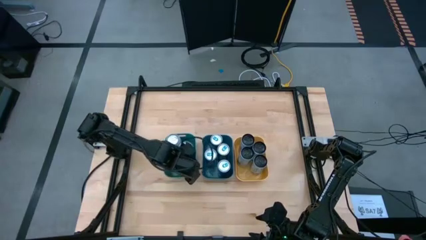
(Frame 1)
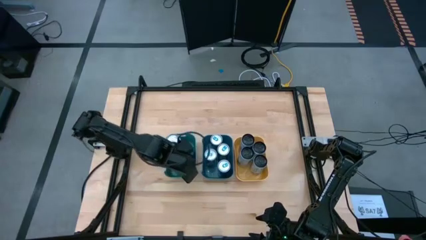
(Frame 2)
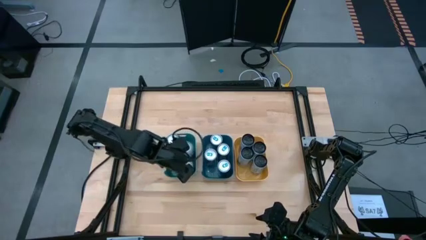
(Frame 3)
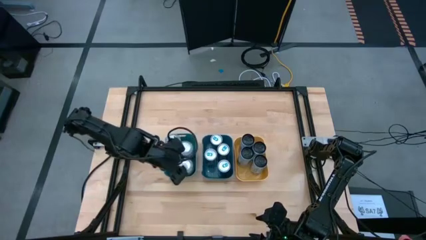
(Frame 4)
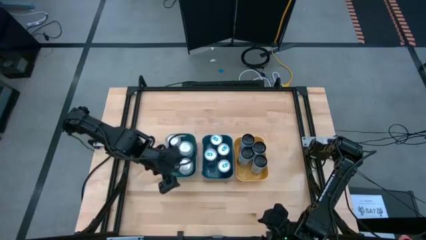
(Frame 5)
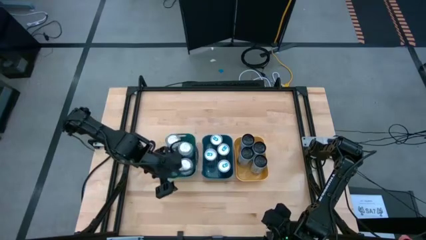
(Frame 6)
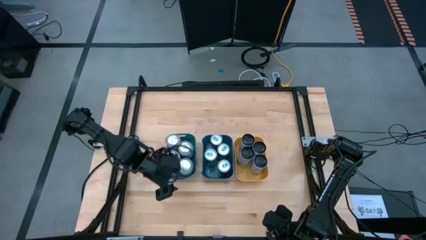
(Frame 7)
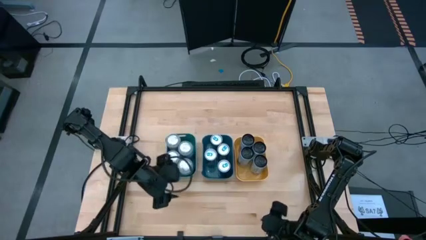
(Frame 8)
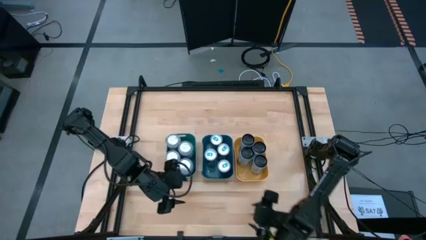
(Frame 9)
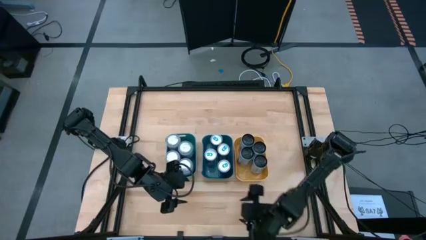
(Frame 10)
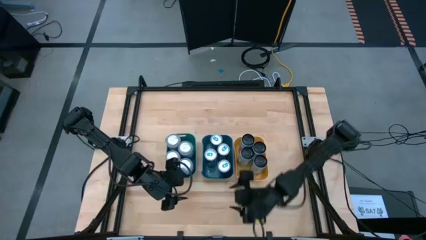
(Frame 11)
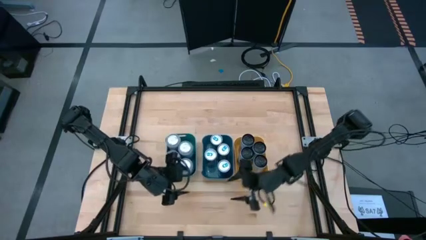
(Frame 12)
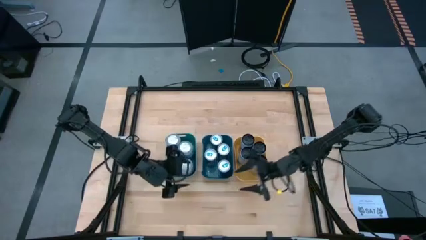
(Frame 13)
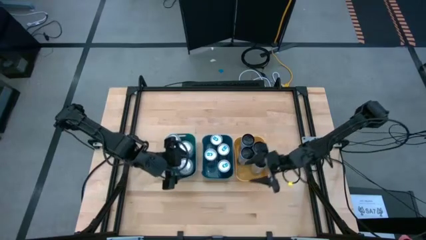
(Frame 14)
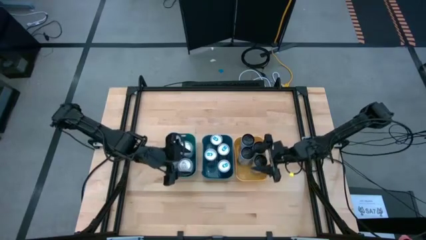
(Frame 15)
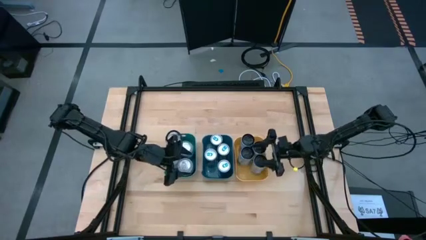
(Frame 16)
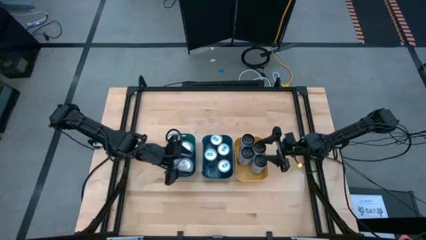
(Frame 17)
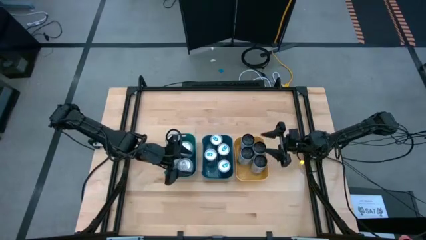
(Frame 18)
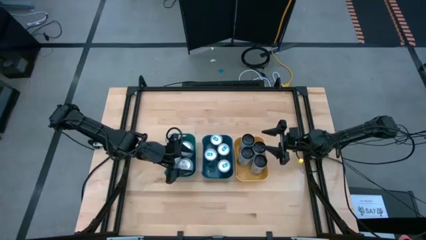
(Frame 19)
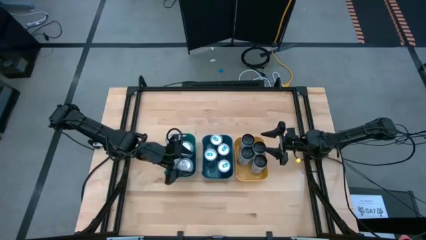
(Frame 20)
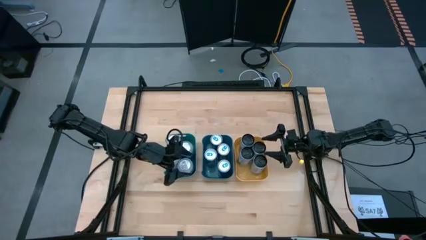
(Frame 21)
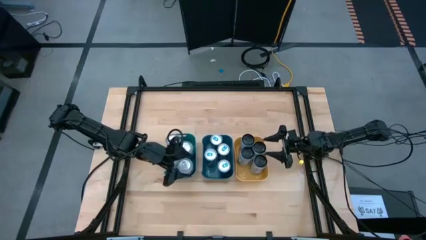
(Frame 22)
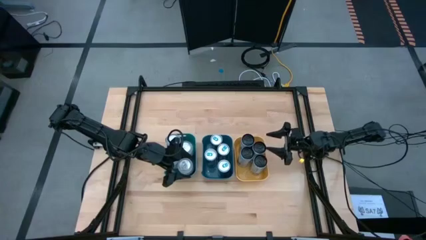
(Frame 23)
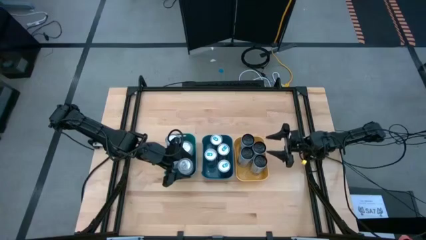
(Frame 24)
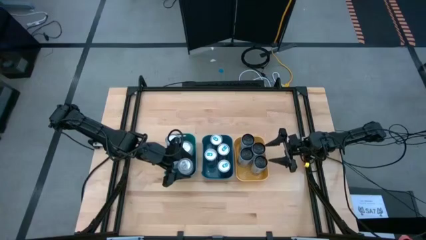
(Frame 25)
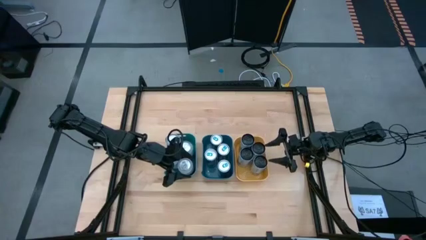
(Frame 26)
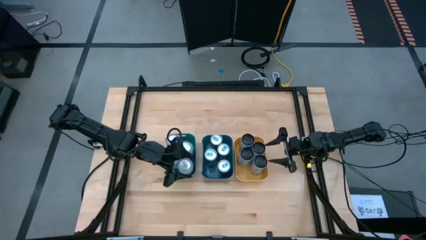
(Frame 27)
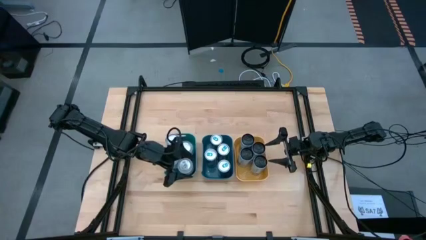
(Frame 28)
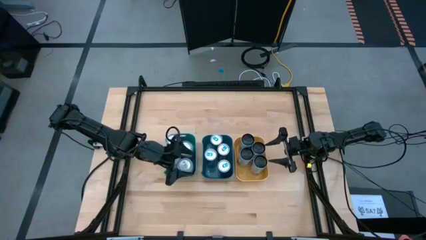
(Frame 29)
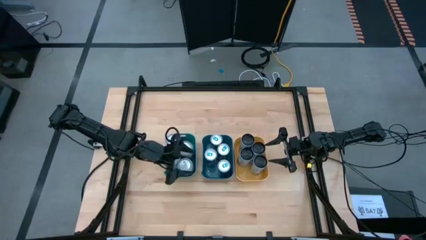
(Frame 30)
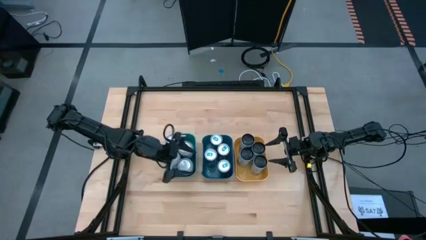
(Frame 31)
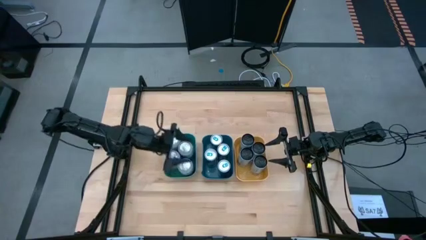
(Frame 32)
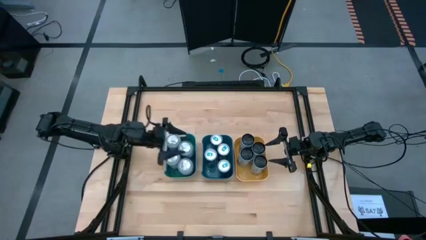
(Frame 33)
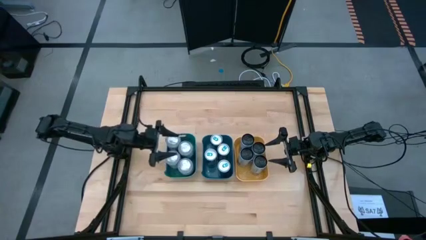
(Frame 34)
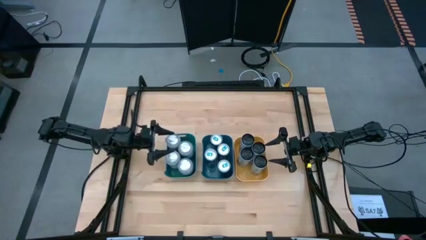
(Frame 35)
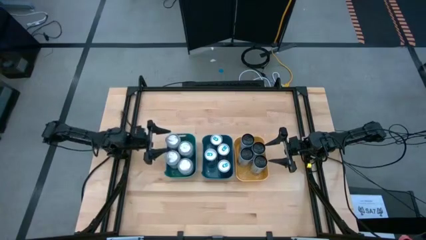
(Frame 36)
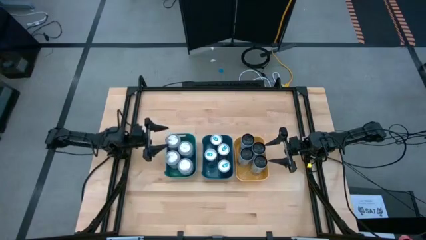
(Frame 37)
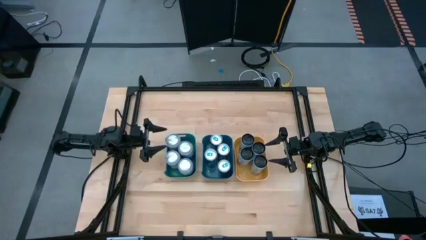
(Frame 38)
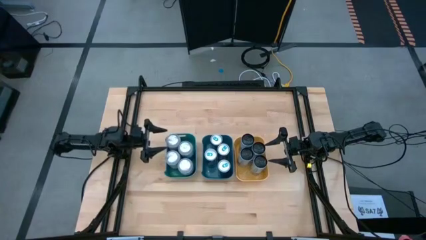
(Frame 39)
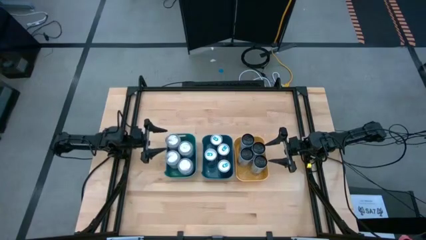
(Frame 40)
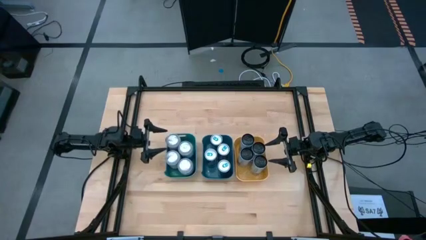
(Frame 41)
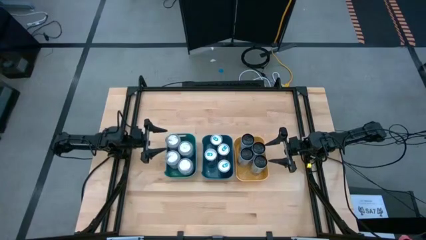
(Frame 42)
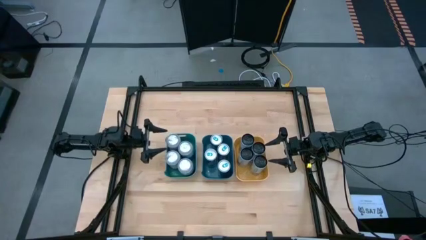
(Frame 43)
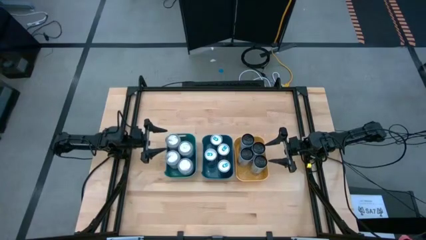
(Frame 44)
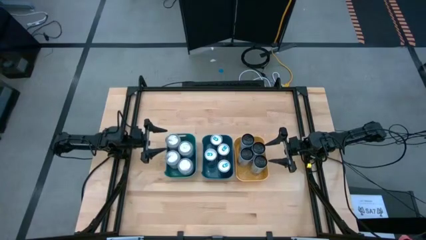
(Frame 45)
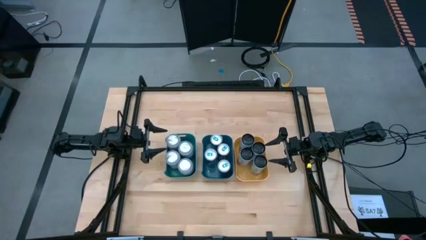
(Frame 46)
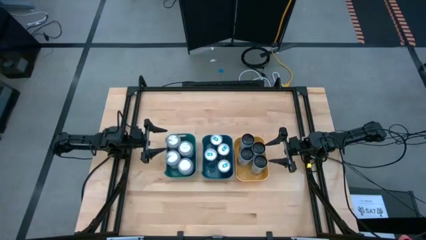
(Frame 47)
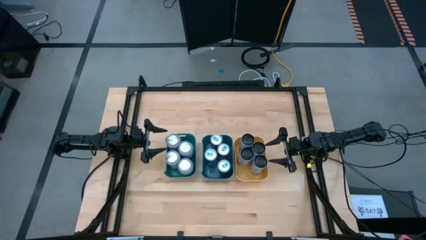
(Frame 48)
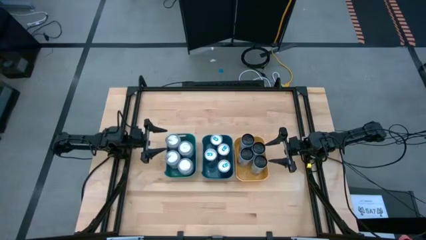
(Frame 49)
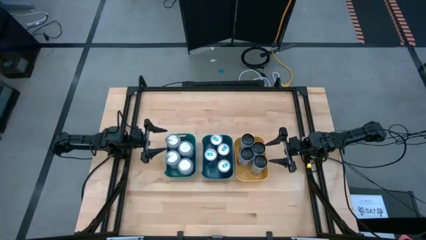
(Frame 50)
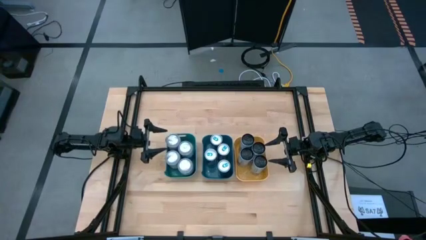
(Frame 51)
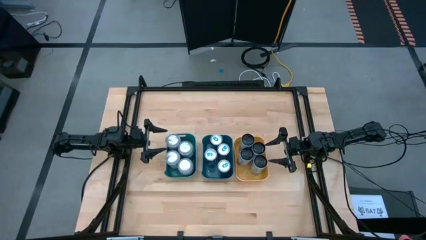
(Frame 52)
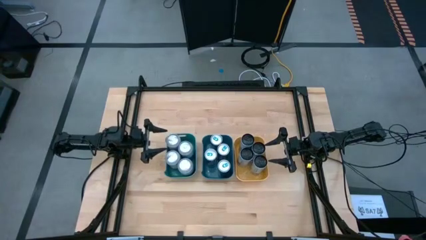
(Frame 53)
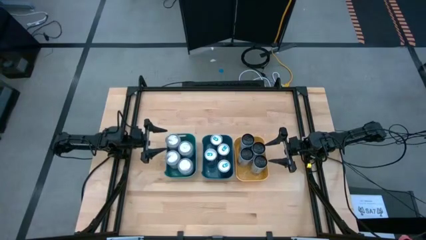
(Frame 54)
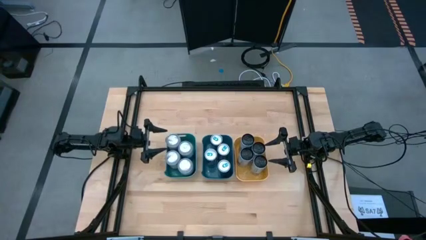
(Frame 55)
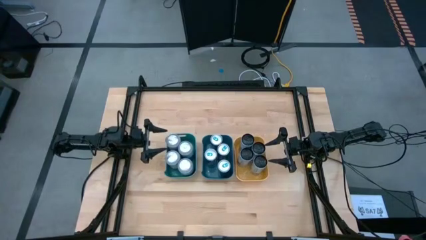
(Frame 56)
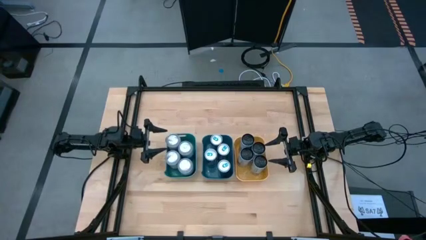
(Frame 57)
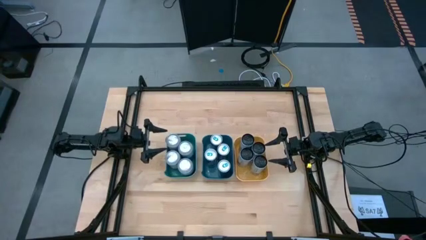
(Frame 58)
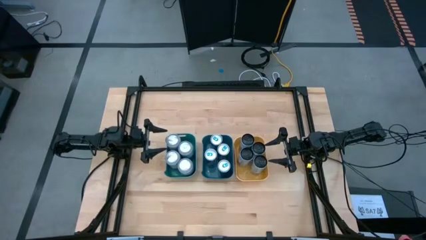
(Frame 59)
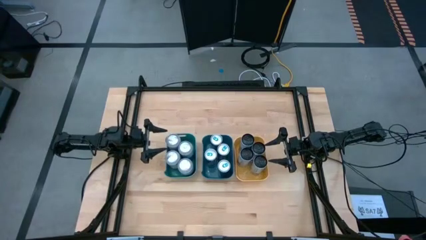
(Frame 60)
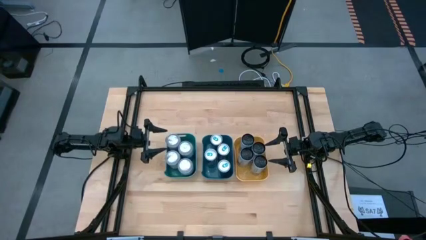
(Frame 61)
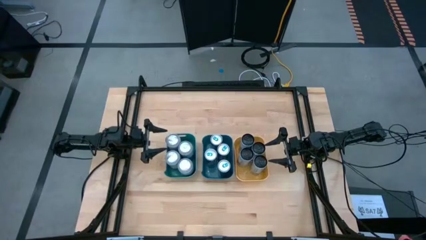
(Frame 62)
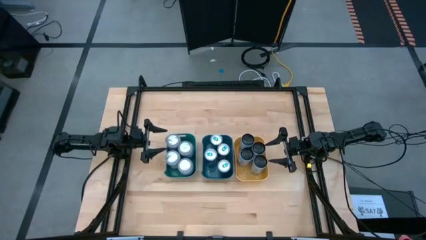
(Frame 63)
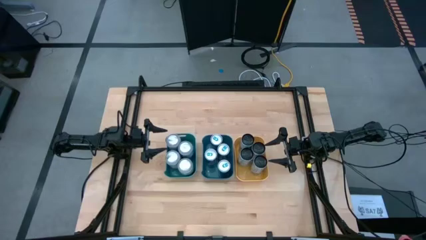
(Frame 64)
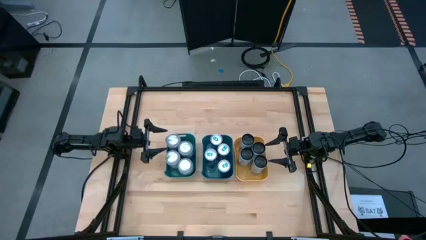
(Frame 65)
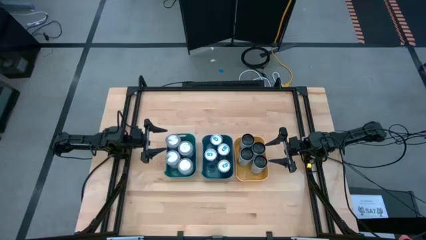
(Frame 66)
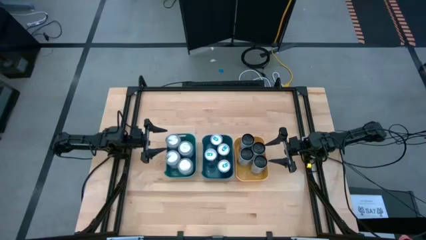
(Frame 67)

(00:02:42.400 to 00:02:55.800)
Task: Sort soda cans
Return to Home Position

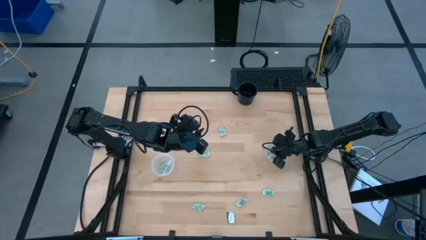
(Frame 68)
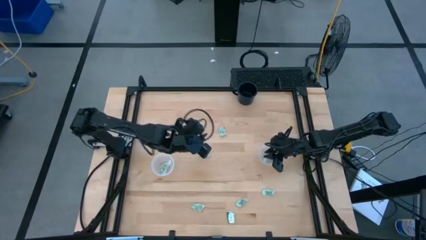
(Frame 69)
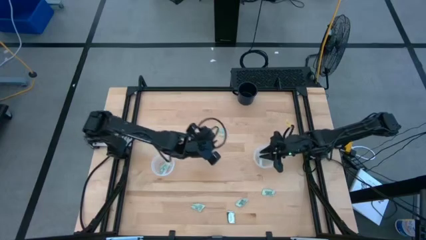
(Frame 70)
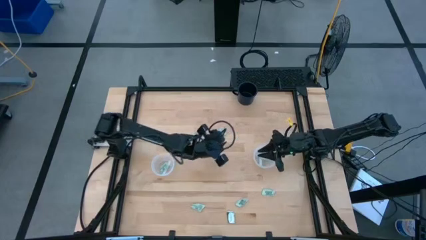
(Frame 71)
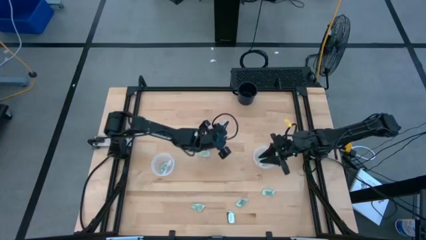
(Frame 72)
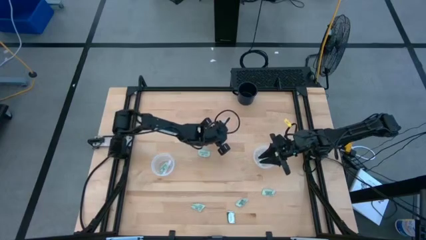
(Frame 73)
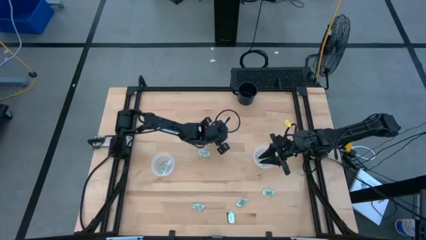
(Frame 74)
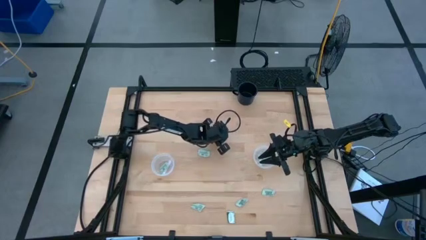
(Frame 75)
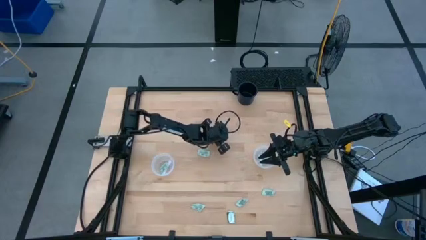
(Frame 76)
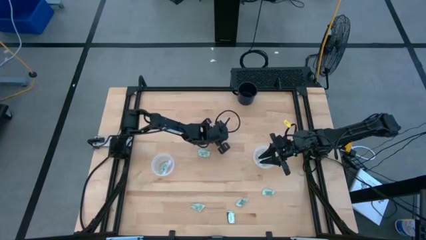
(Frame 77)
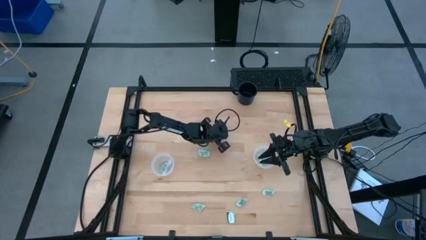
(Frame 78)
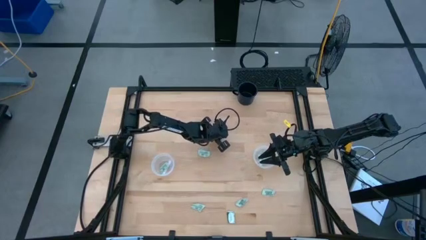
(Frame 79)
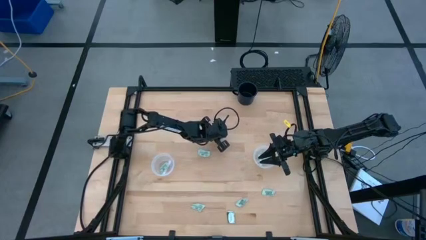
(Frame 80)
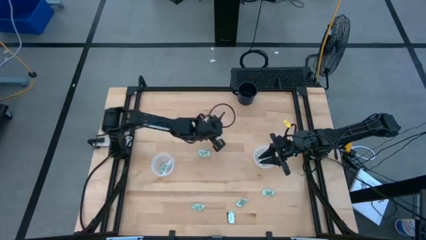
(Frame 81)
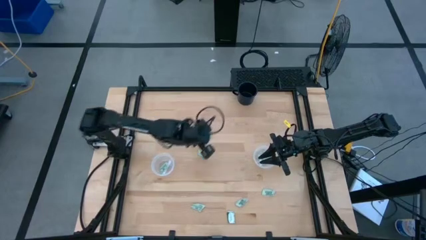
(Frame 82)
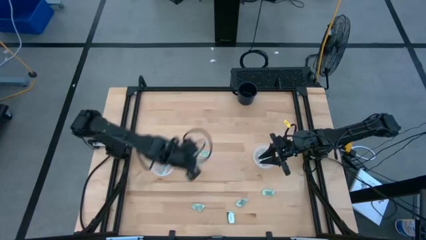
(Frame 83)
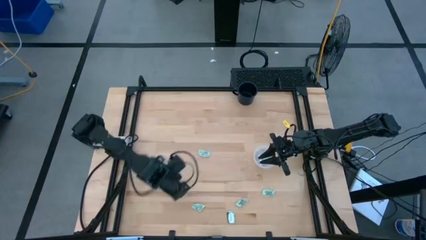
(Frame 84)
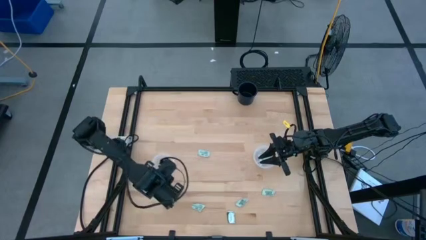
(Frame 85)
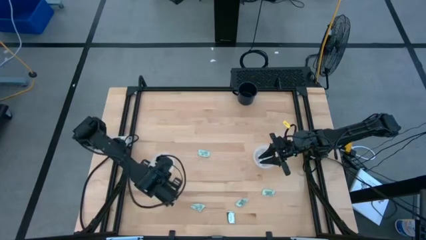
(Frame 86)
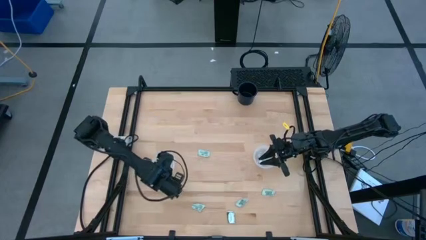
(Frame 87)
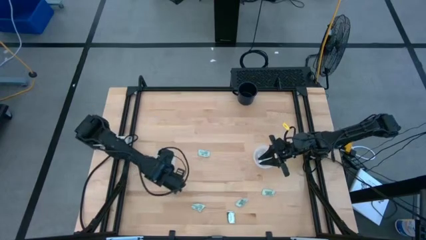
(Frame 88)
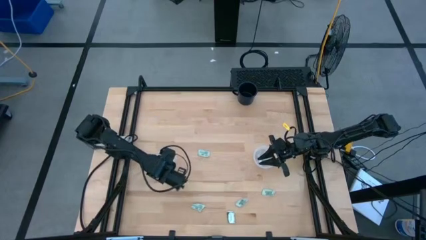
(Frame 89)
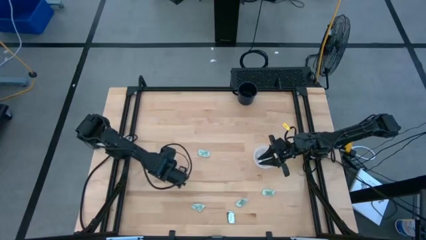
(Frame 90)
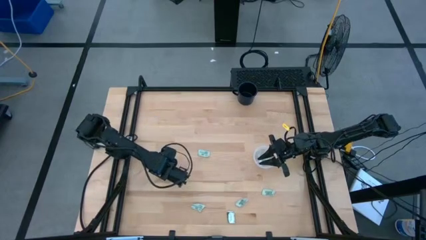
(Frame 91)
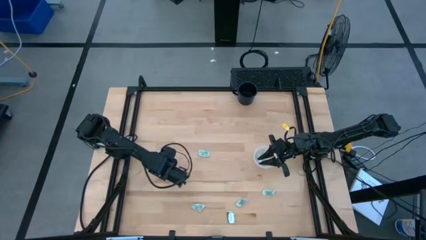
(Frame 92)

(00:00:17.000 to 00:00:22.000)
Task: Pick and place items into bin
Put the stevia packet into the left transparent bin
